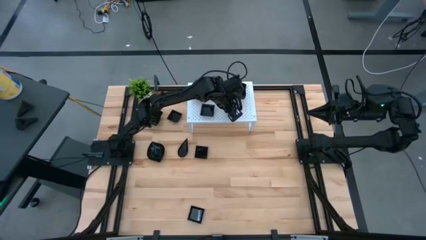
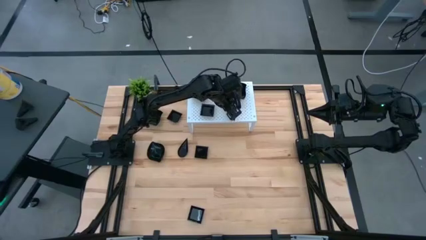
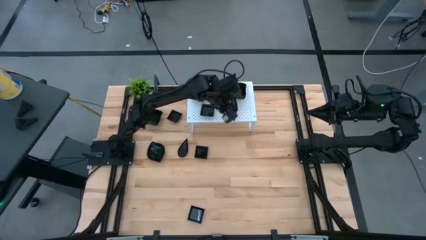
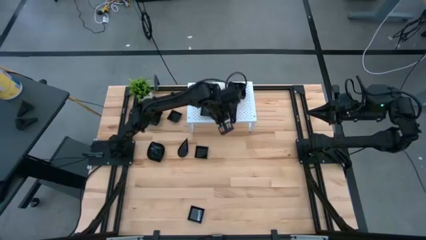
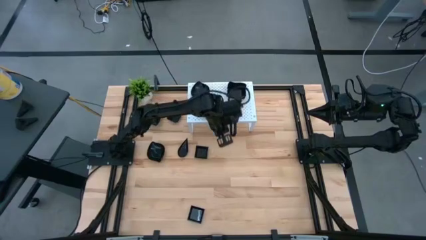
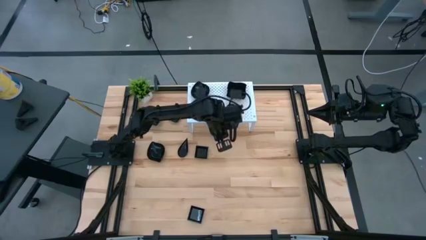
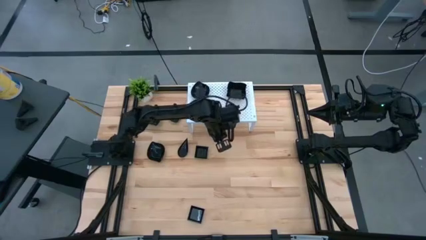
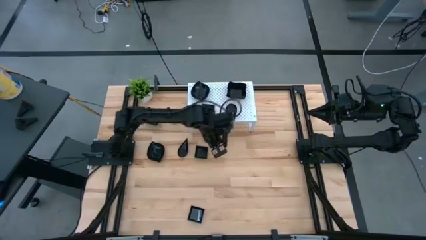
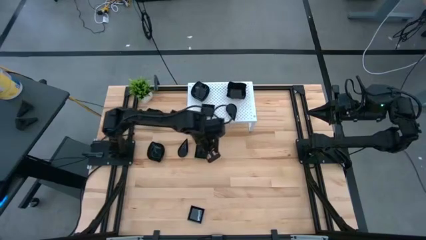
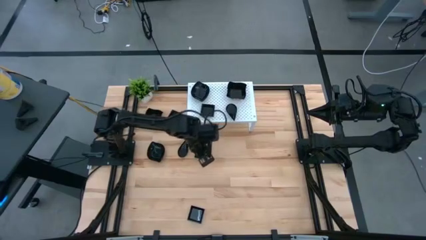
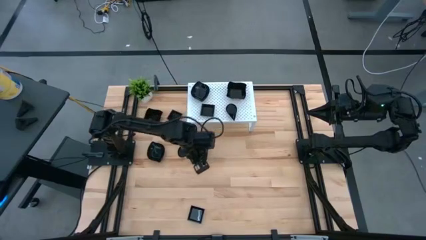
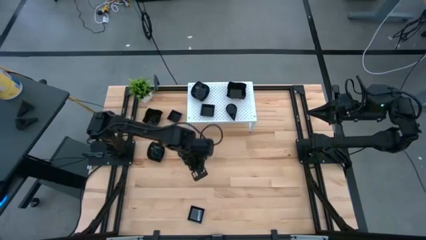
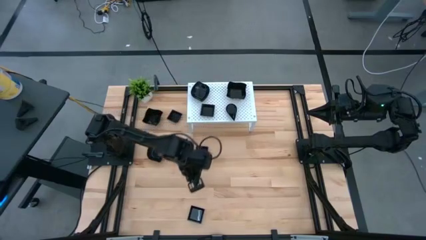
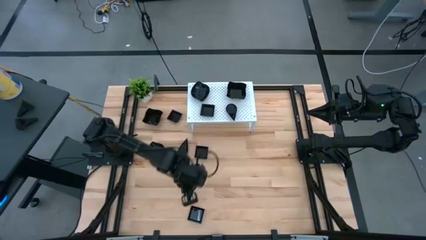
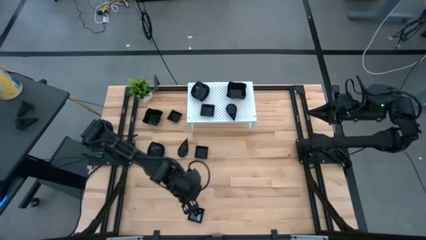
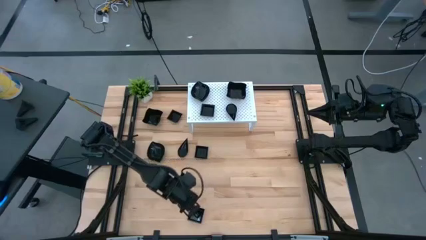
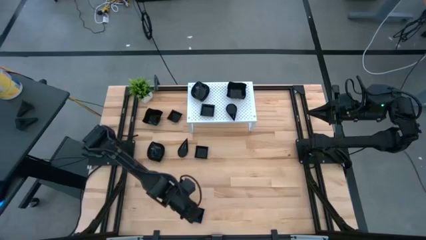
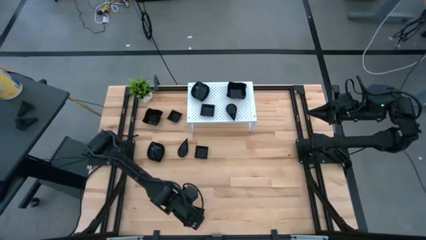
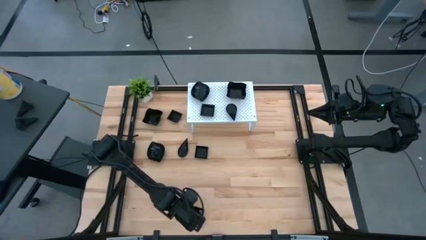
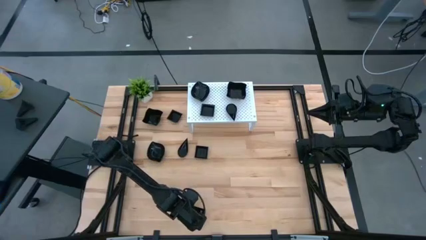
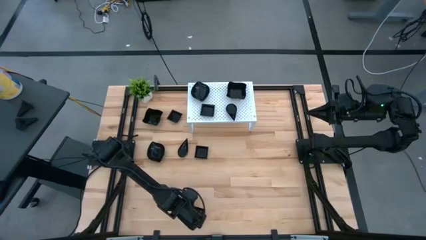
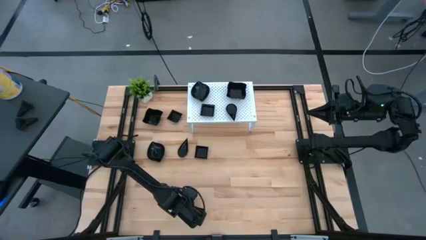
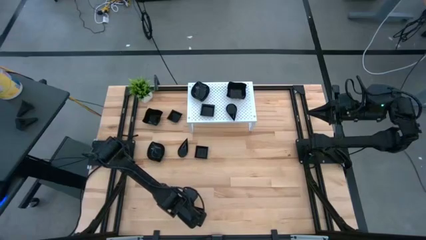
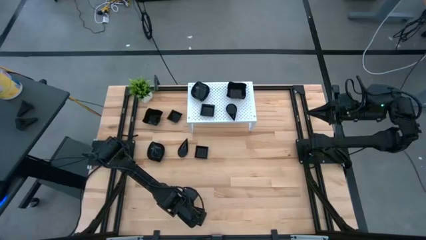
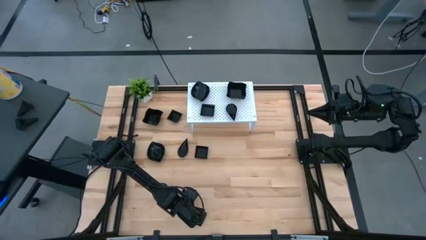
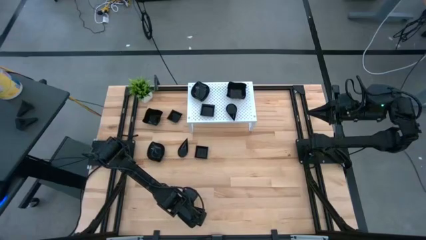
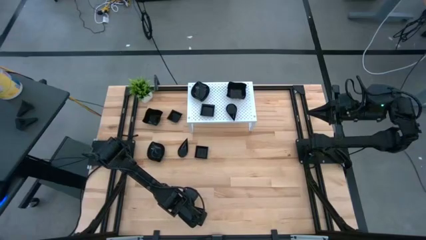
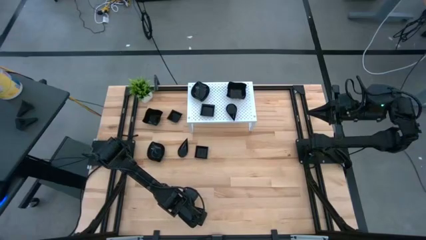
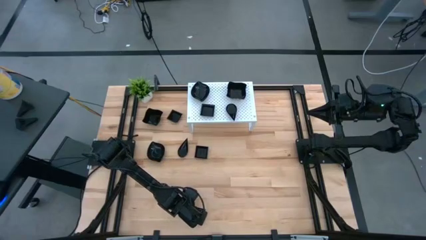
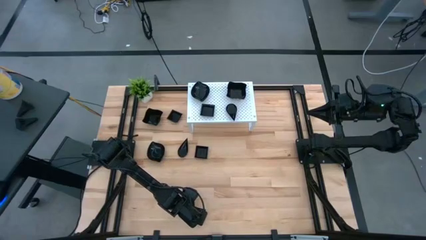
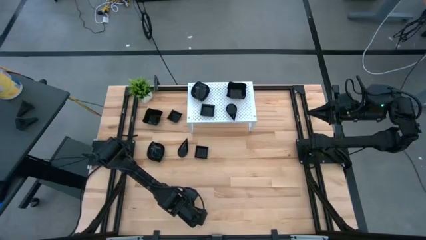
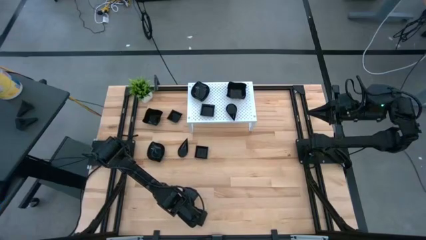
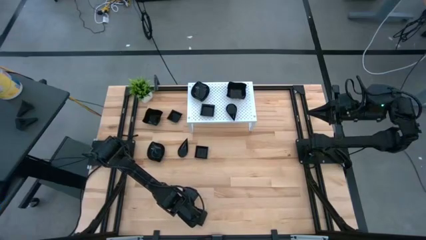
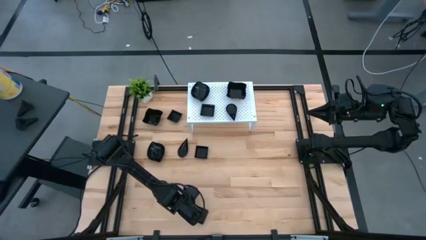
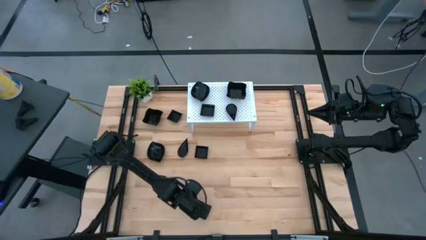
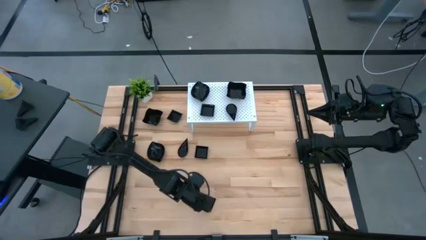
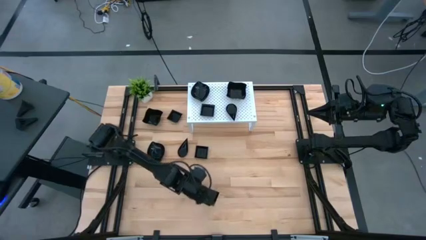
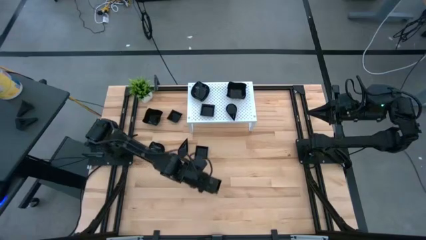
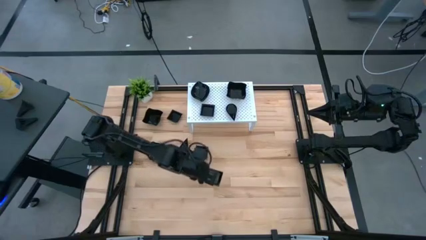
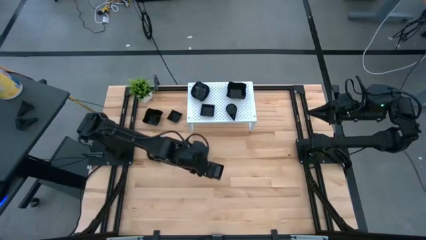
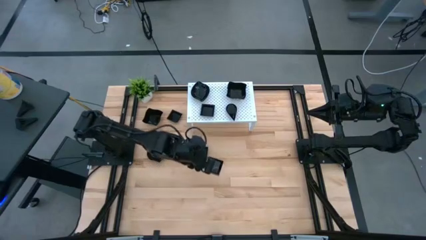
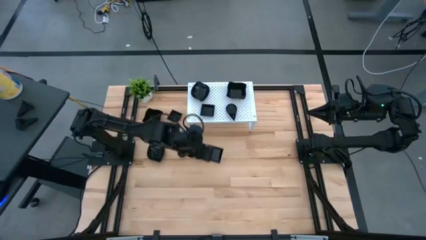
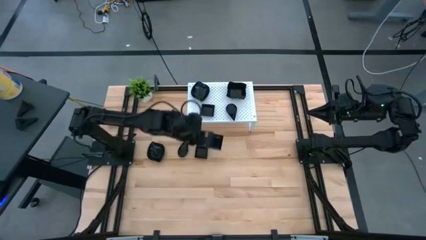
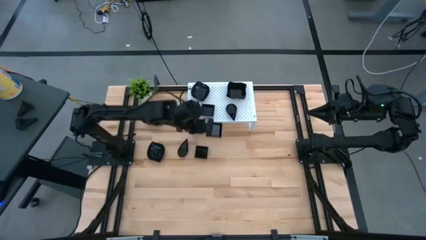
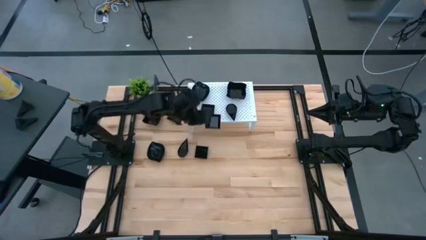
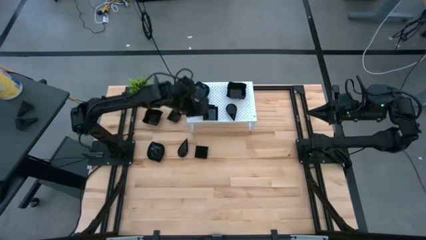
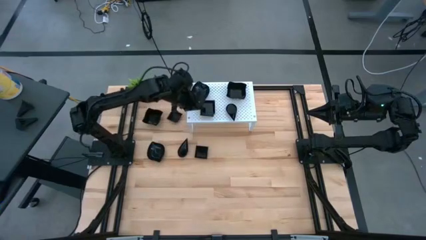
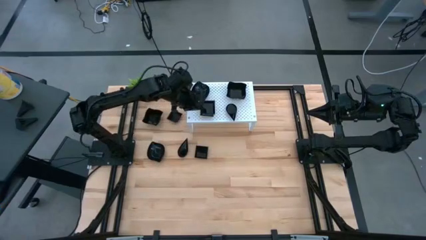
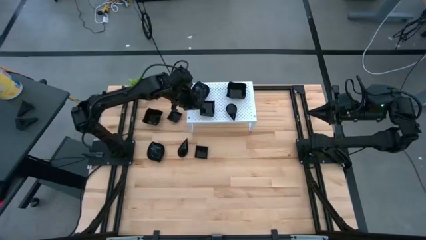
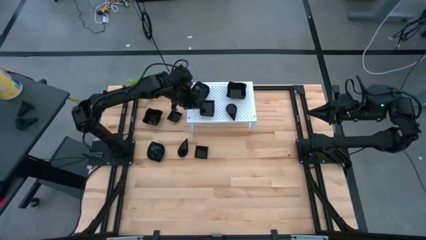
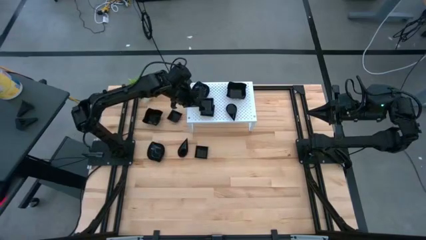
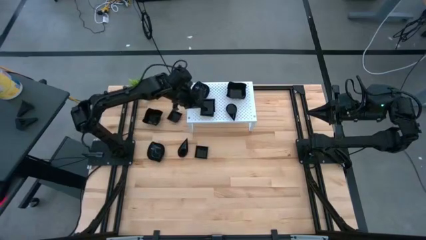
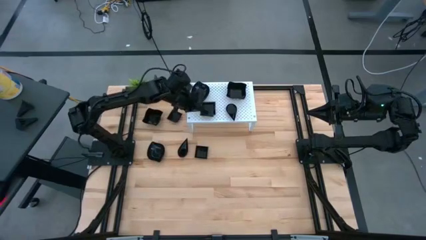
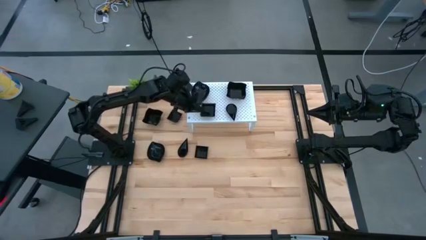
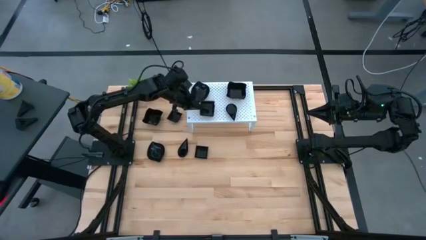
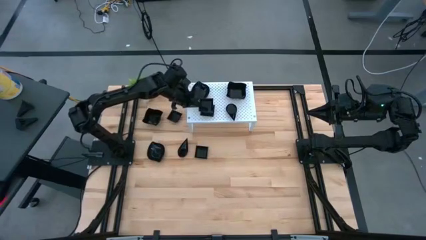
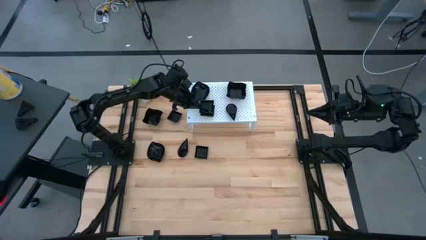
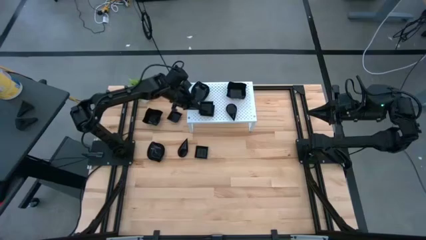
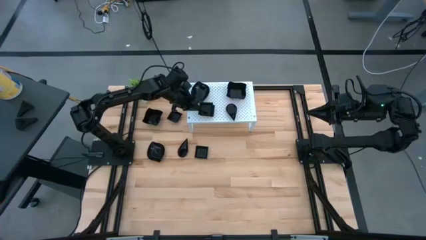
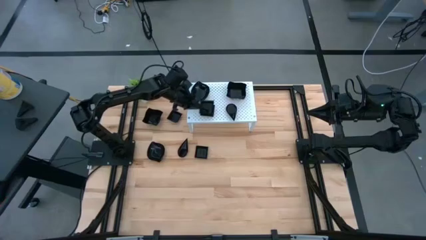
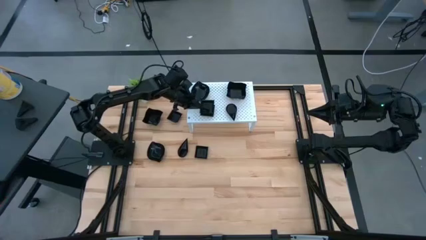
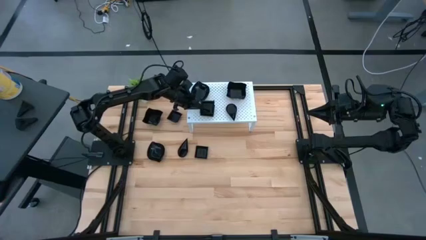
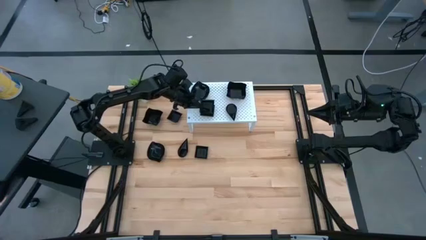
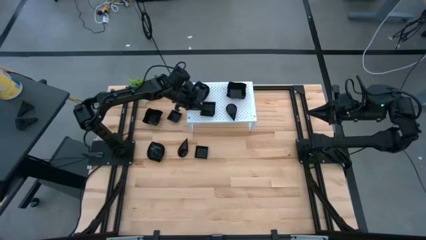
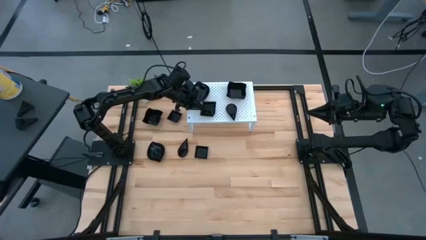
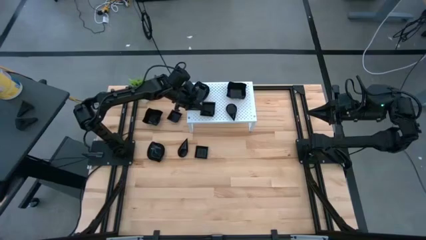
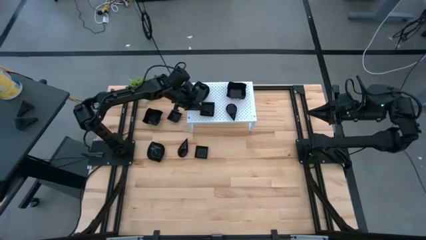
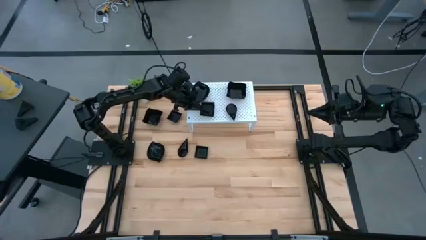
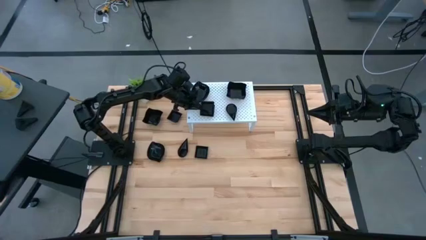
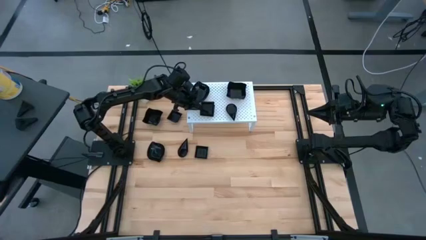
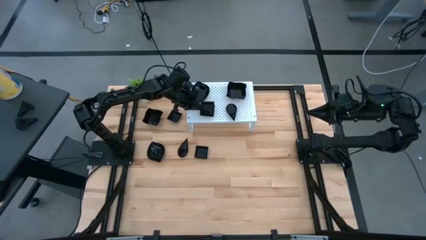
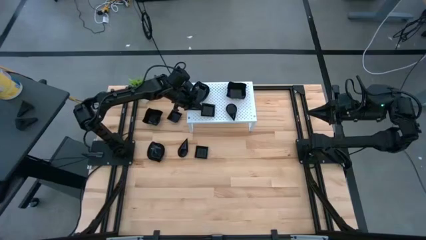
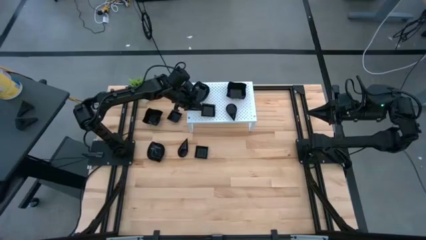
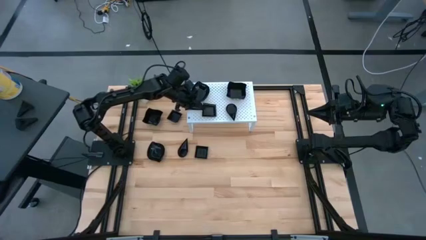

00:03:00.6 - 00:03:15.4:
Task: Pick & Place Mini shaped plates
Stack the square plate on top of the square plate on the shelf
